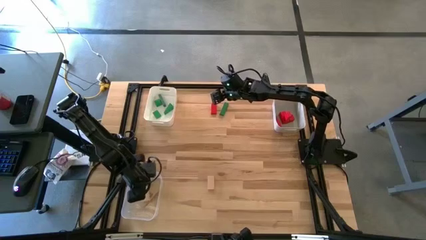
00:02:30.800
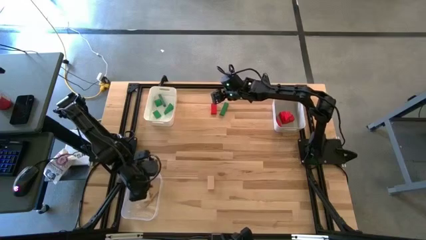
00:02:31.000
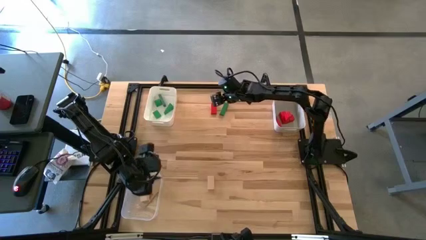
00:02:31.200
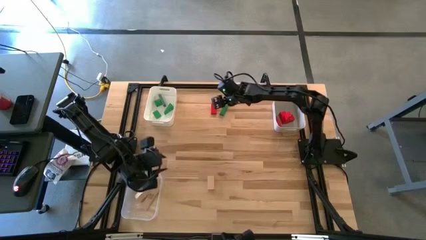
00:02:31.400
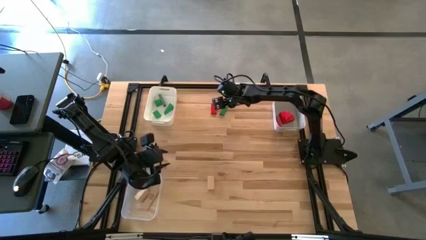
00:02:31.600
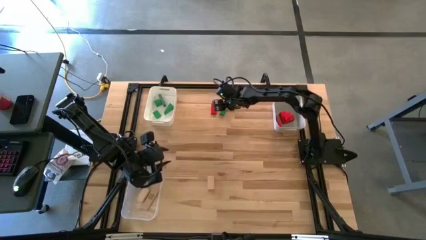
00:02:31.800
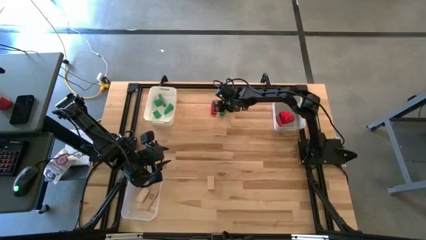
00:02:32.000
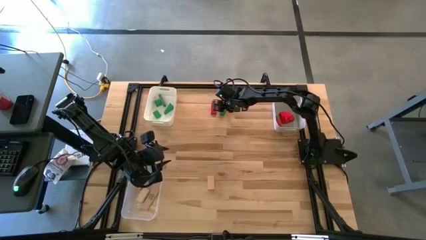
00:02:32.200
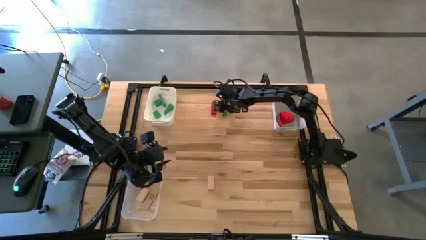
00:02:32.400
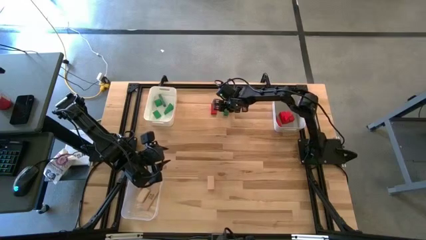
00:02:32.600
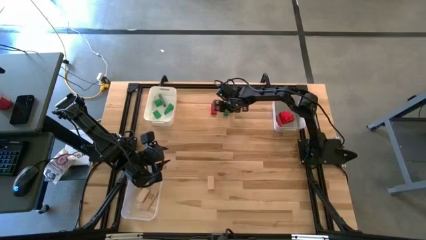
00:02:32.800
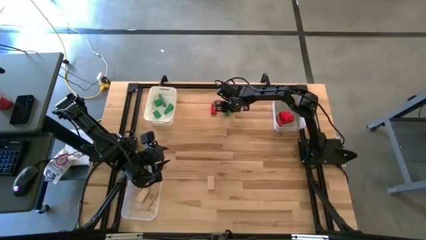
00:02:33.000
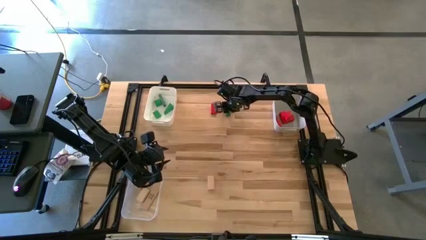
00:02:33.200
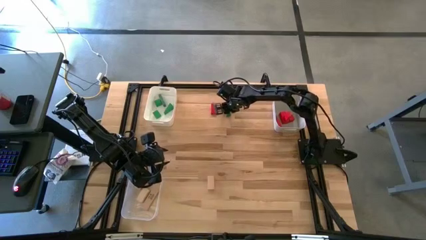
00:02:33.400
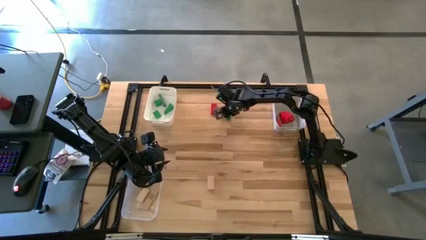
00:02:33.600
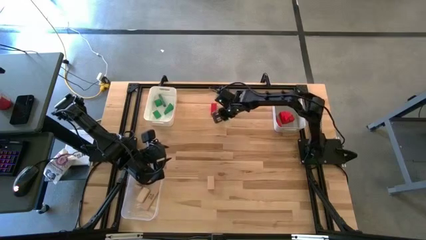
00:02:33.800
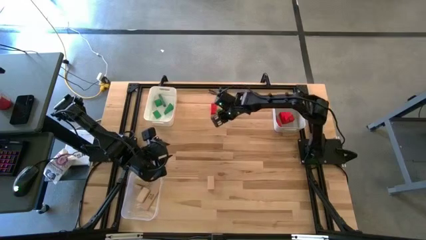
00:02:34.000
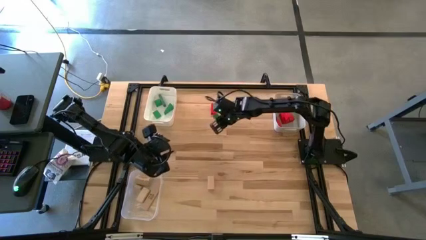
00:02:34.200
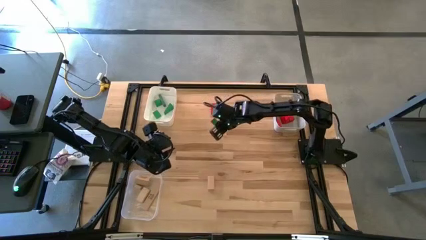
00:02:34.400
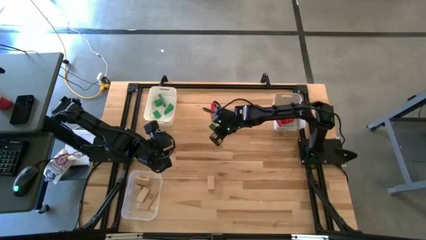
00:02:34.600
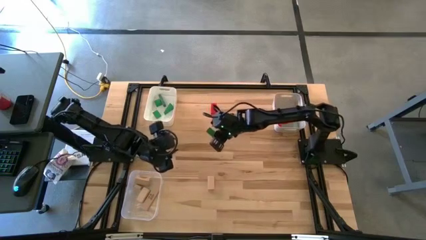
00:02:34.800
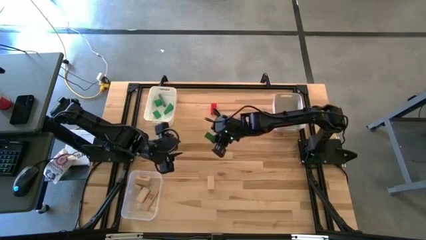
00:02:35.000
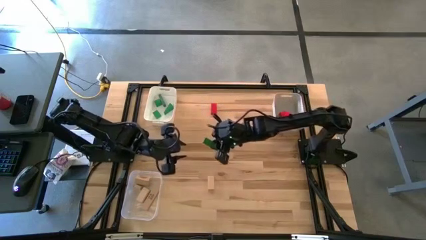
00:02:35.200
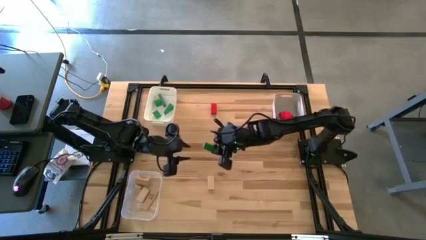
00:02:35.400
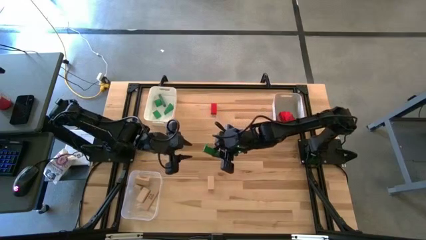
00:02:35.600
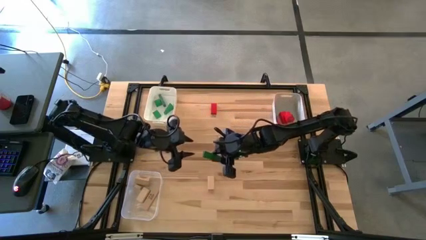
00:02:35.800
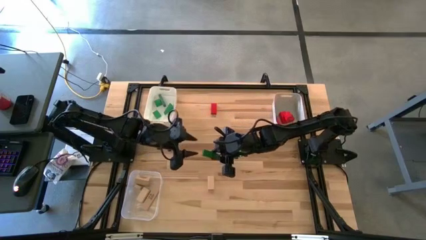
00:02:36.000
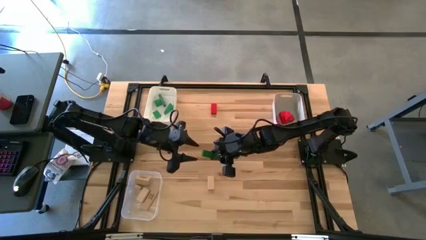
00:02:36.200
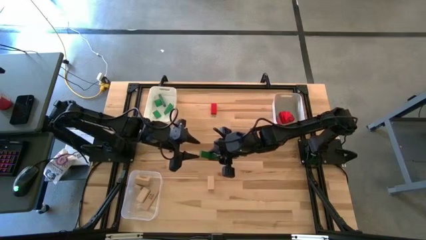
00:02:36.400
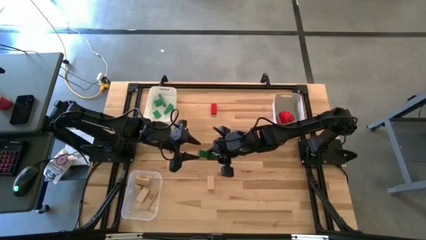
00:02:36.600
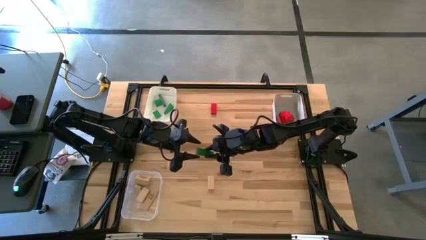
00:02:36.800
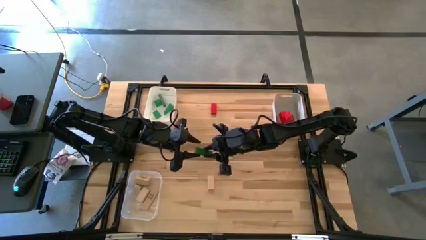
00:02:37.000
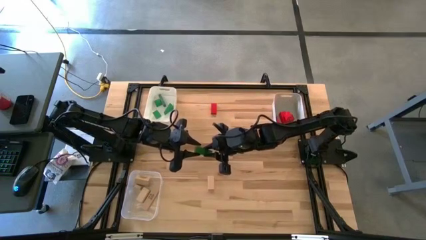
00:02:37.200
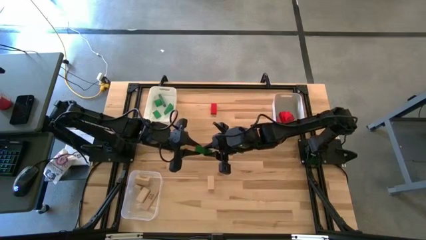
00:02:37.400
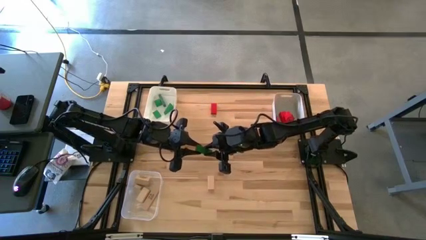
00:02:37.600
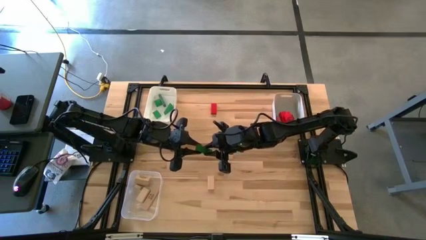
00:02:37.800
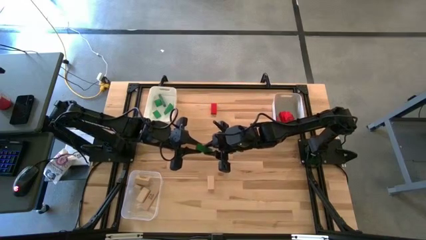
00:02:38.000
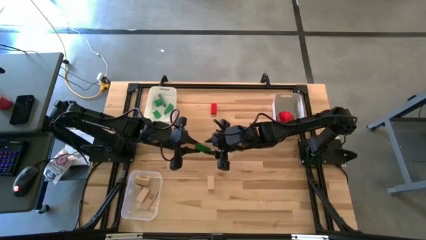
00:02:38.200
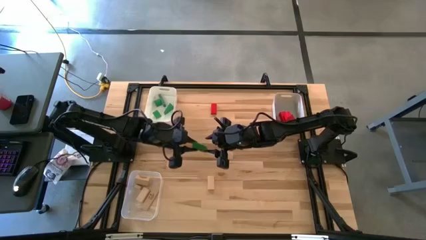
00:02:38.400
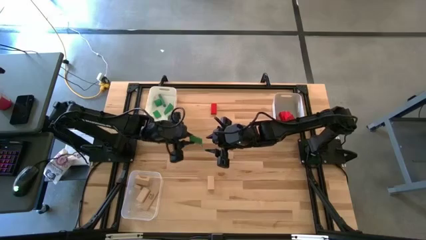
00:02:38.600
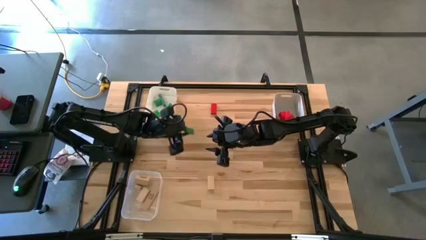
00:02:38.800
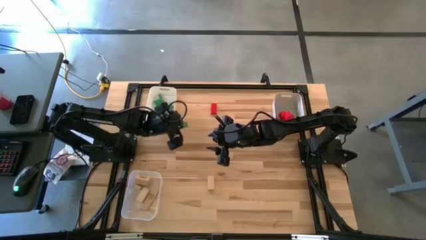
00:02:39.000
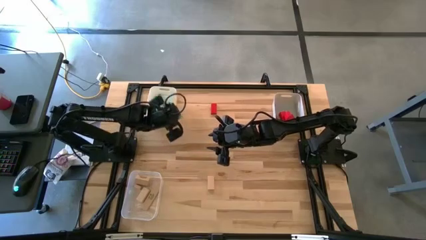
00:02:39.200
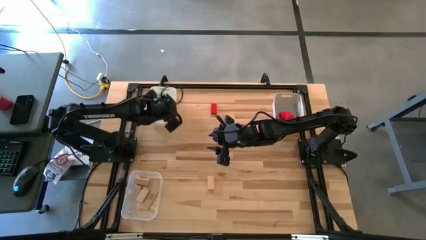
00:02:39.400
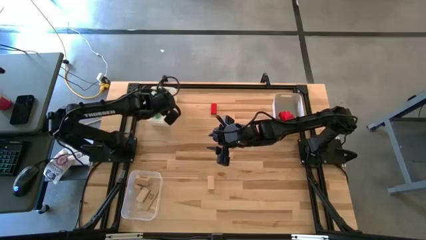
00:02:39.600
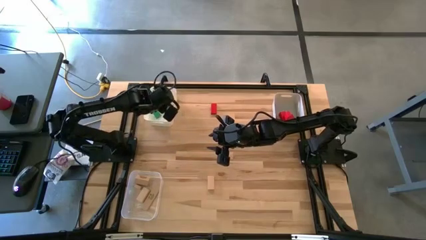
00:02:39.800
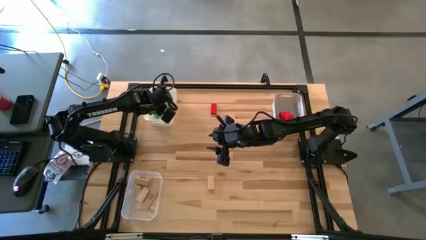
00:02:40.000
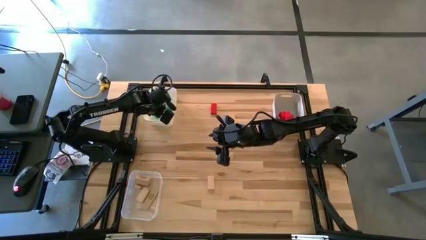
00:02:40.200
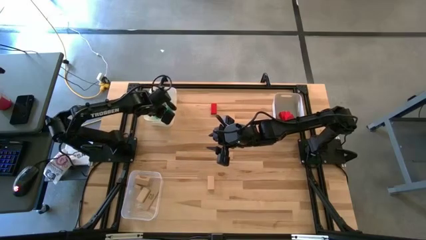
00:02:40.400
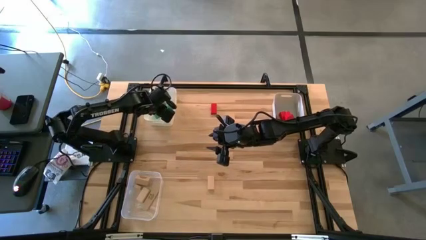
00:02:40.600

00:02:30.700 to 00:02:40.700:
Task: Sort & place blocks by color
Put the green block into the white bin
